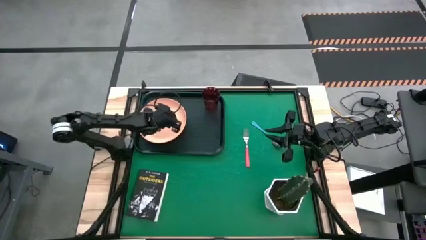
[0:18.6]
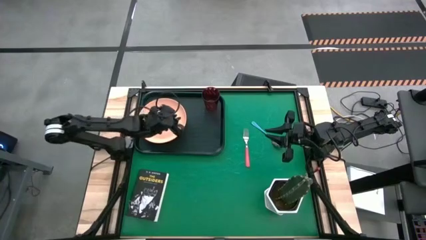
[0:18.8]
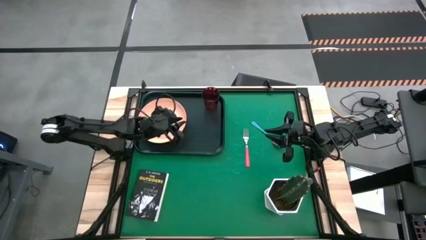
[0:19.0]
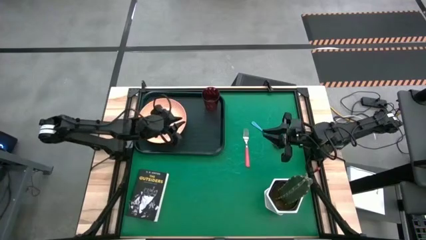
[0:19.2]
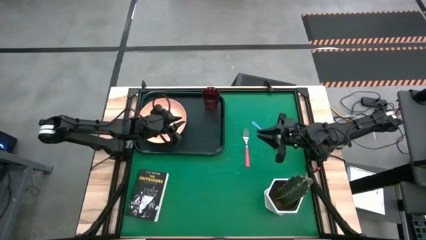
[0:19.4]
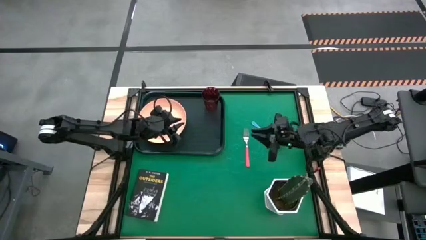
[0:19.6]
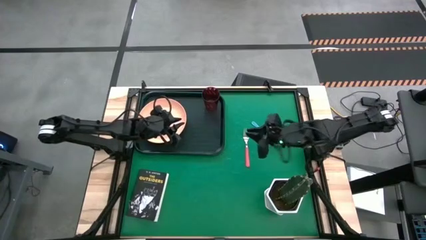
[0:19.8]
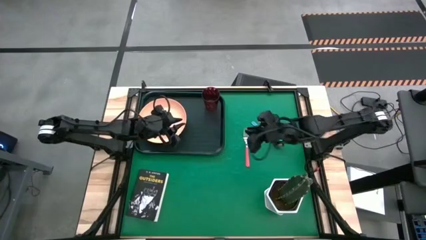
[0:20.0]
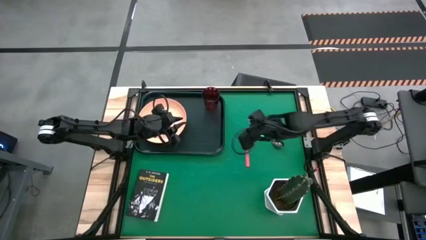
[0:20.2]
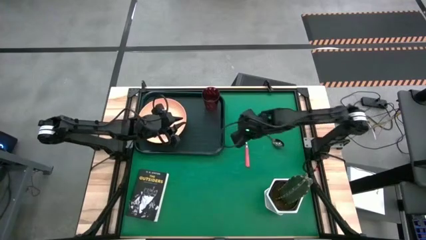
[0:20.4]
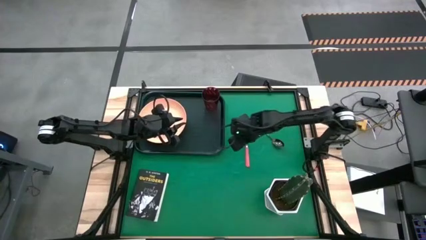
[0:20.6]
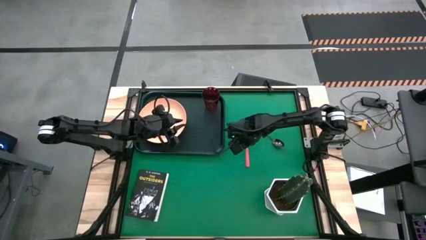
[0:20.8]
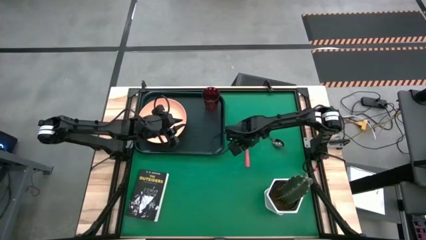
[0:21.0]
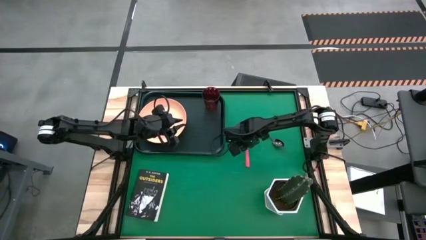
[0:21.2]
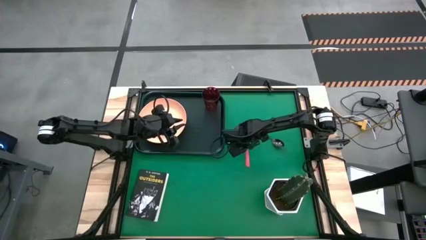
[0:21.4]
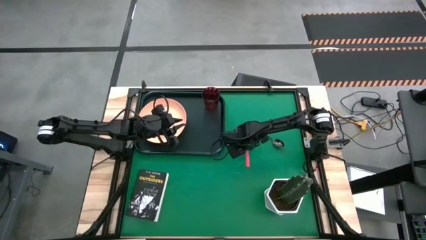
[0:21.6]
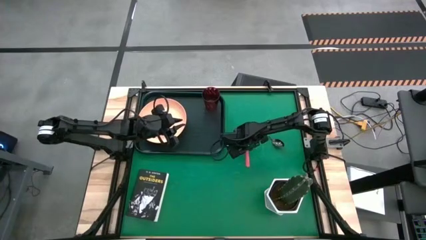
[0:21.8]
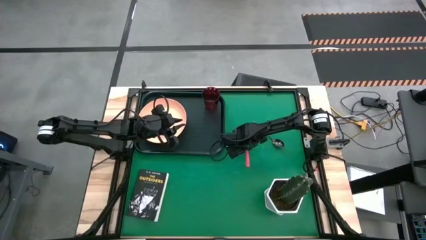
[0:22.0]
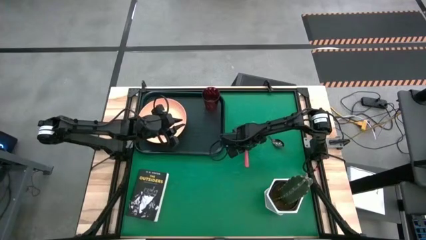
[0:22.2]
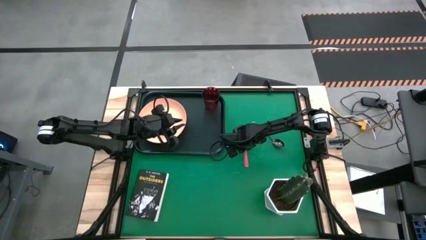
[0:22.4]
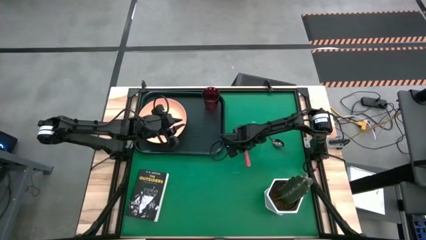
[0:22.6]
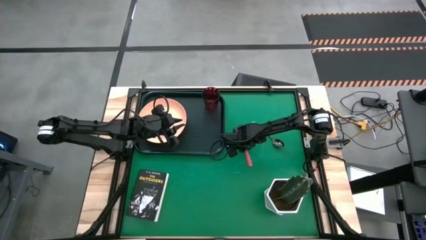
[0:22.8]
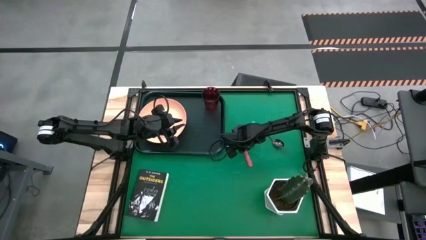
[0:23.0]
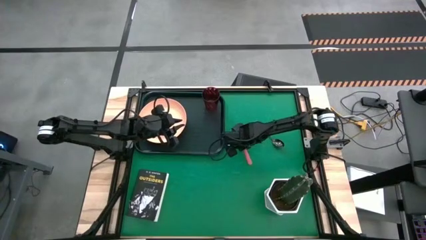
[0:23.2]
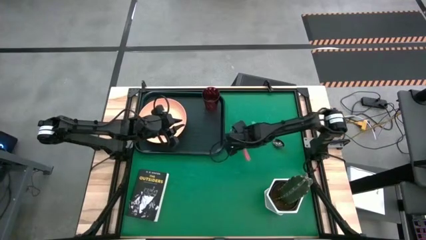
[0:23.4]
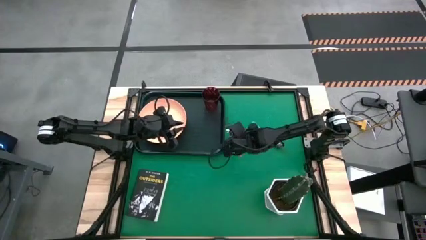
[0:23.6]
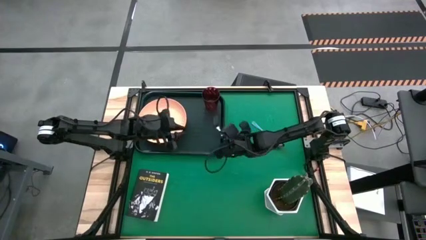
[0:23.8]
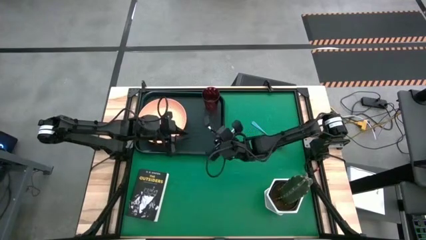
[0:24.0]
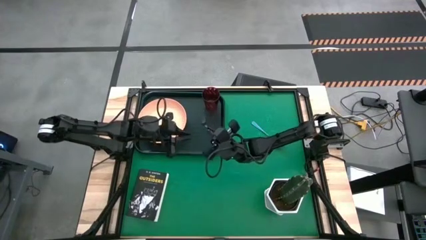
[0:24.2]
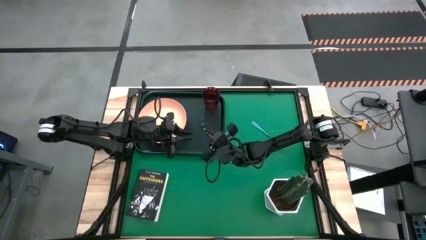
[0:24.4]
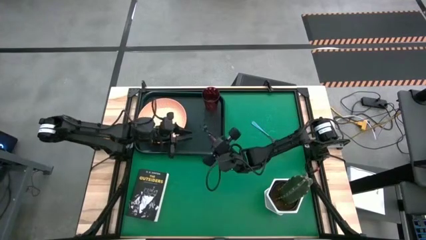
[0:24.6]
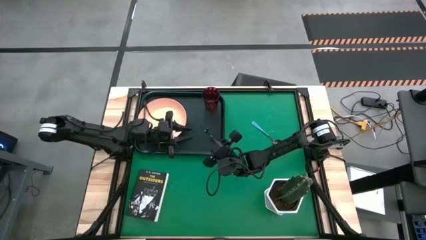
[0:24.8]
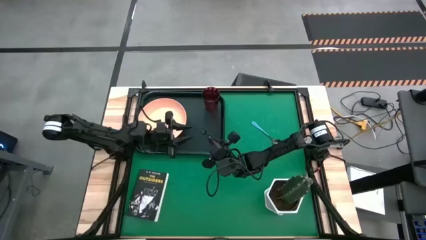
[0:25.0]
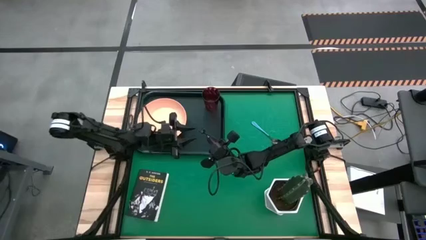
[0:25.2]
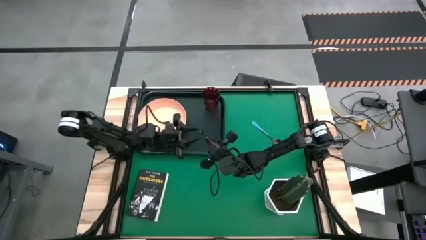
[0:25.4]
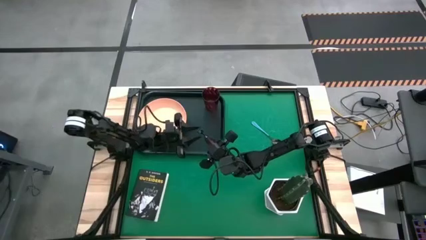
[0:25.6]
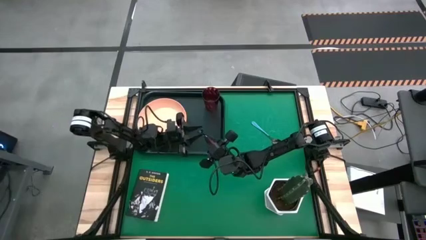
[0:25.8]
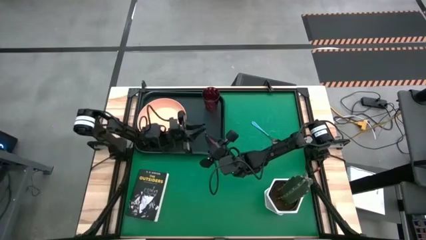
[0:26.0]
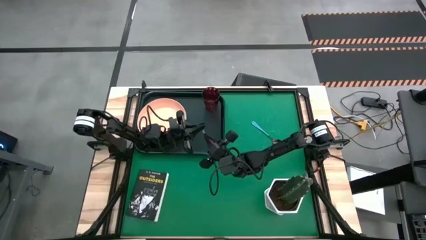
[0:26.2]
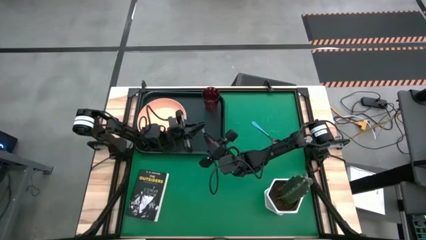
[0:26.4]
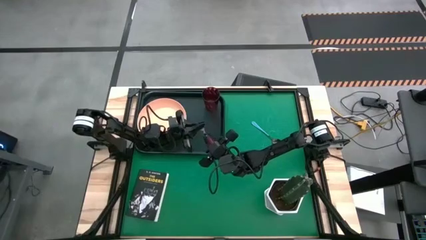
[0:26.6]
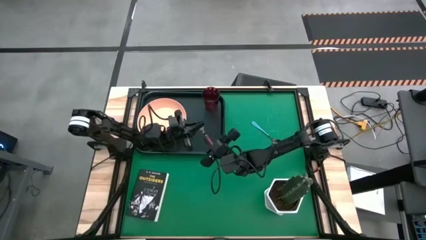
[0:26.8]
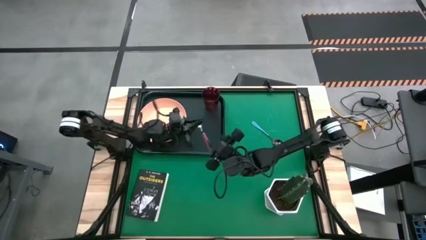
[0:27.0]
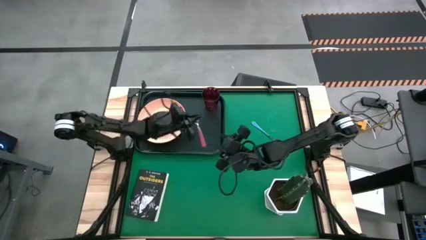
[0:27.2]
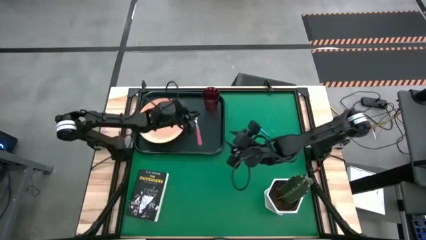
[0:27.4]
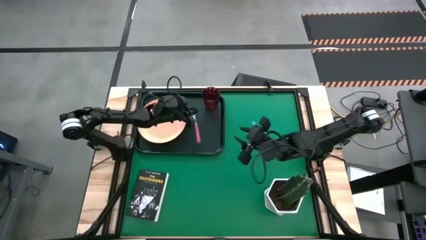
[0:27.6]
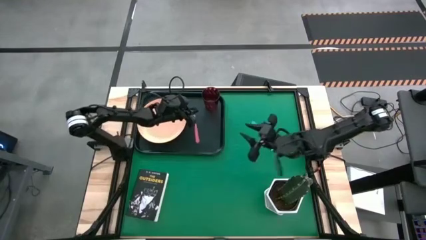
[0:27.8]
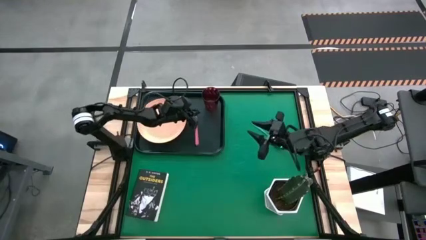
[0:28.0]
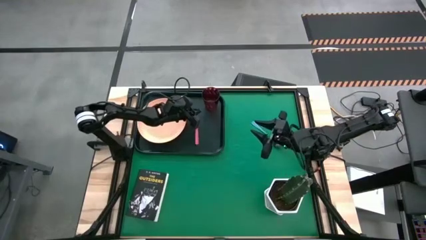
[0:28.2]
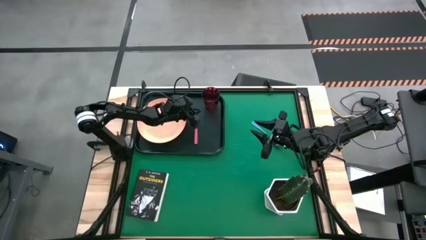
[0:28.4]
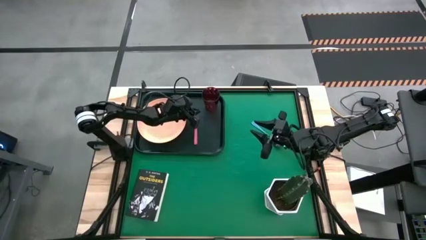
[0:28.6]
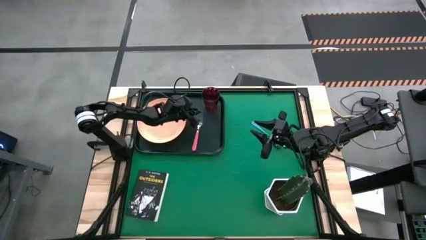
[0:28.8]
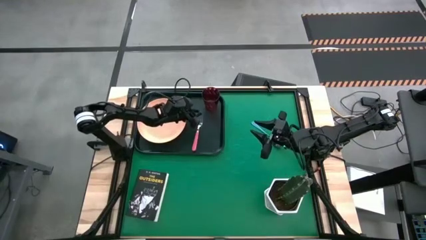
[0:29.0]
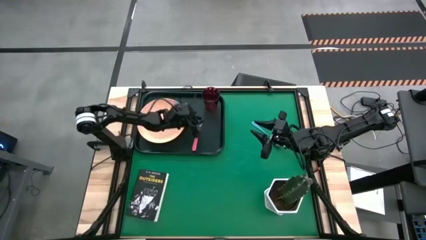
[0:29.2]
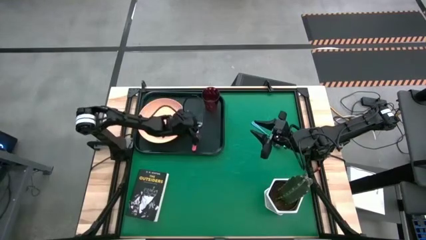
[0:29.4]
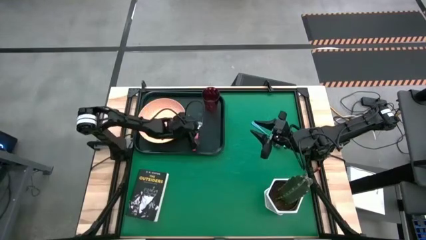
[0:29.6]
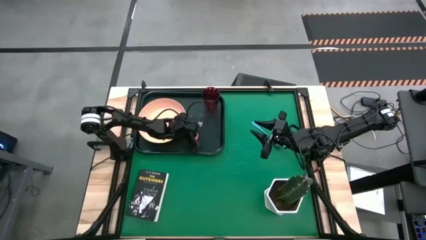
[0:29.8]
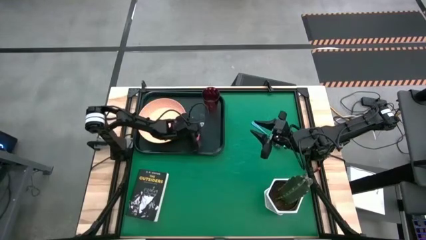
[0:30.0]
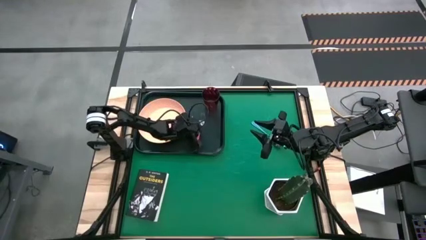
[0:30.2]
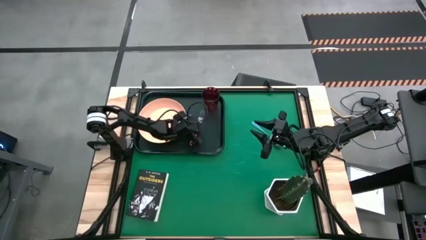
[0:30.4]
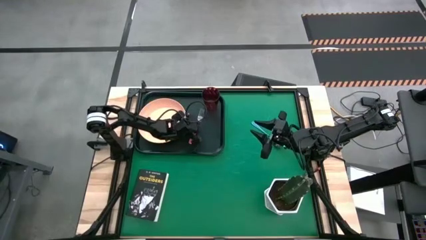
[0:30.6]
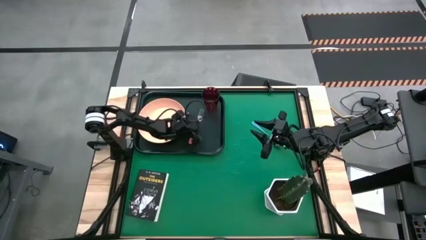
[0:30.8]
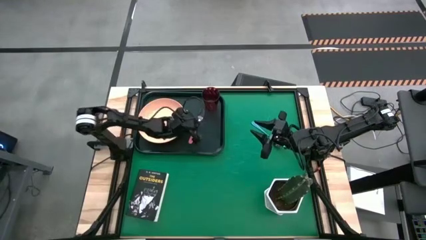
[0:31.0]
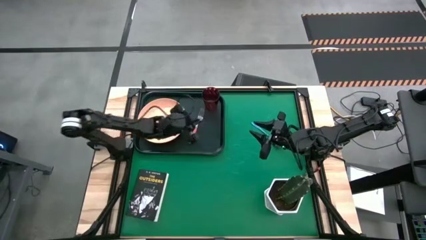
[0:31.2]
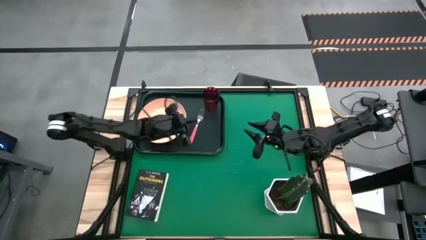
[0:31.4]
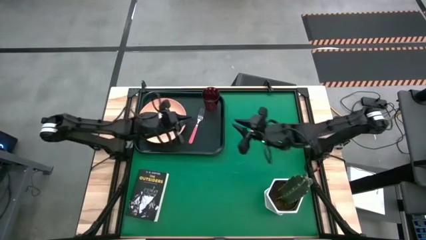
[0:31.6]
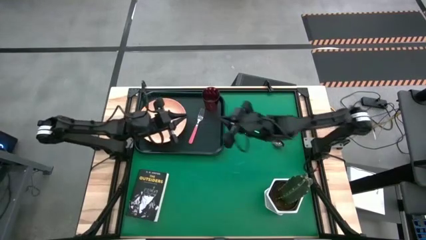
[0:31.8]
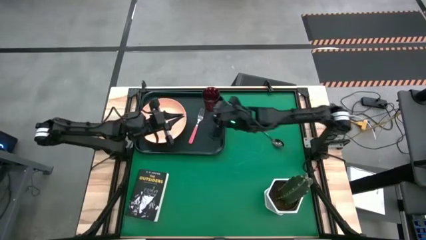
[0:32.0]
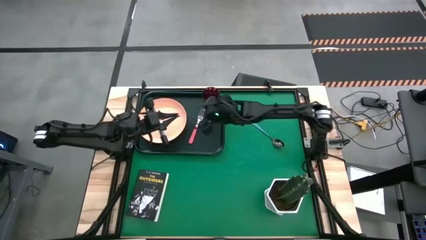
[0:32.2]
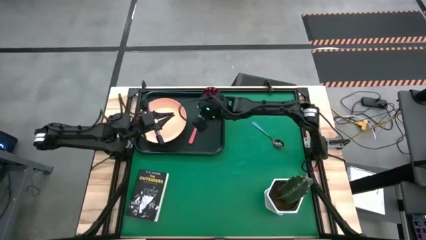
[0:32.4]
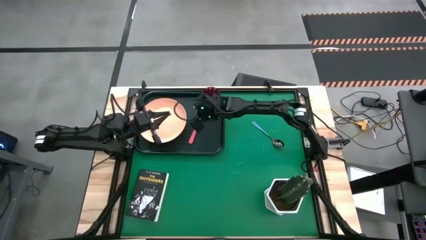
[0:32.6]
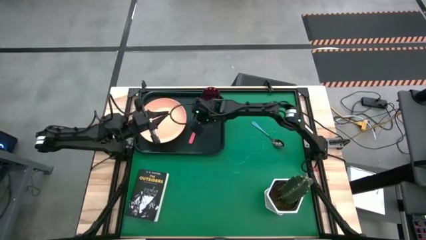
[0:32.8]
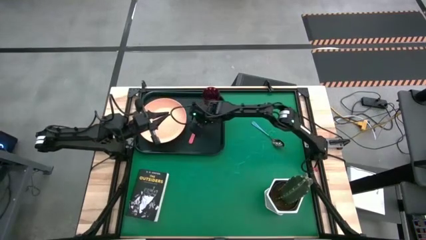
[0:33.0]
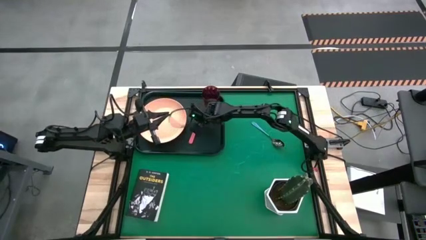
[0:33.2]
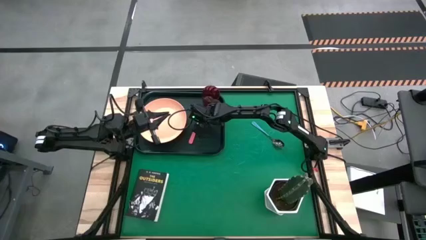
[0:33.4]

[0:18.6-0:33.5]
Task: Pick and place plate/cup/fork/spoon on tray
Put the pink fork on the right of the black serving tray
